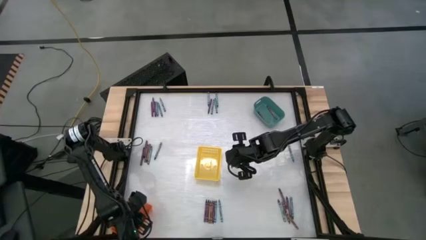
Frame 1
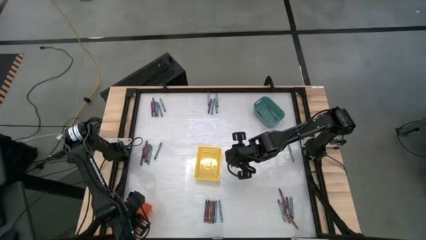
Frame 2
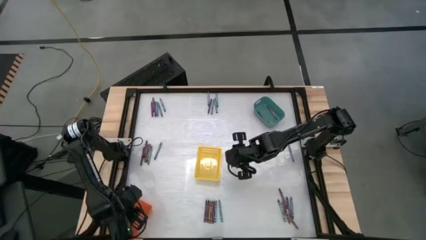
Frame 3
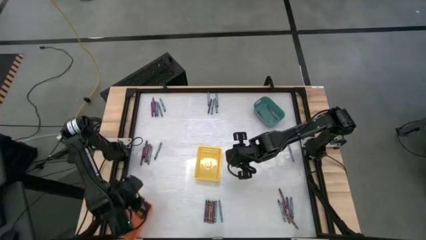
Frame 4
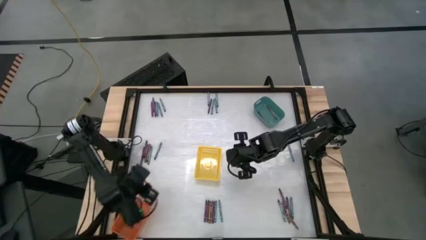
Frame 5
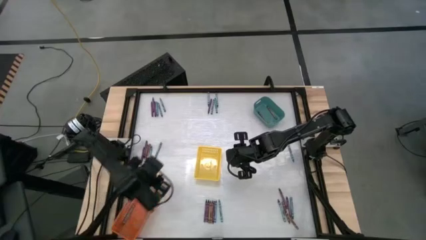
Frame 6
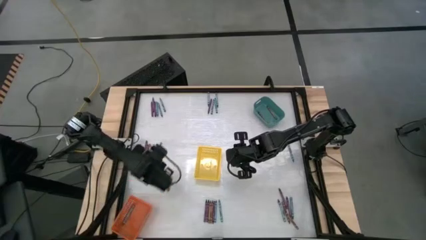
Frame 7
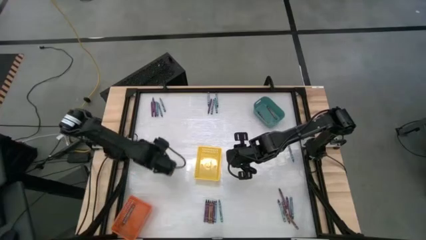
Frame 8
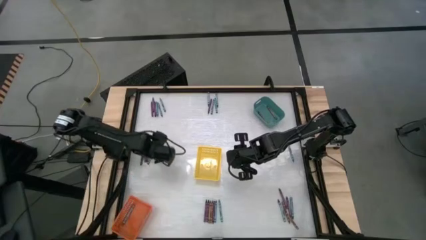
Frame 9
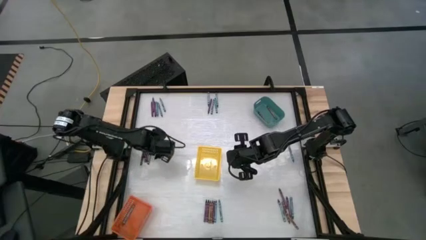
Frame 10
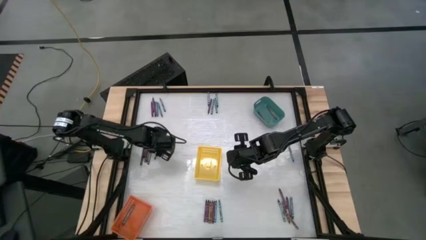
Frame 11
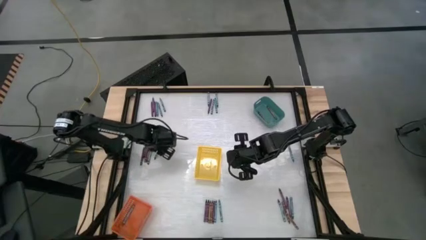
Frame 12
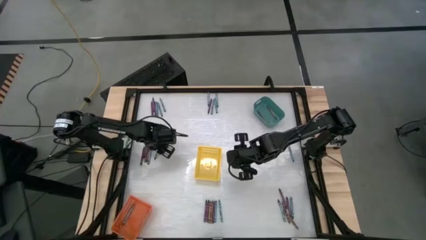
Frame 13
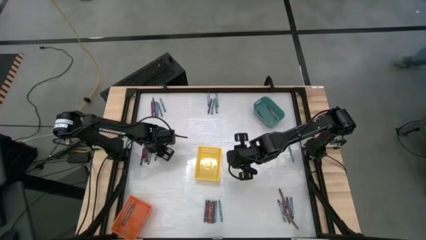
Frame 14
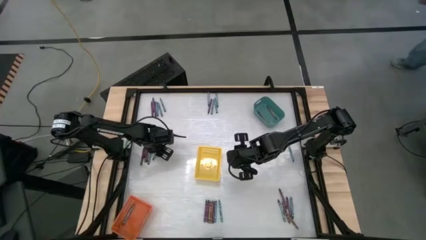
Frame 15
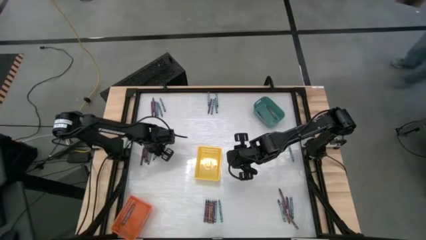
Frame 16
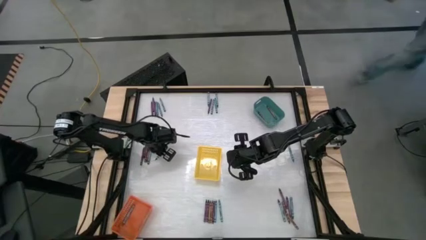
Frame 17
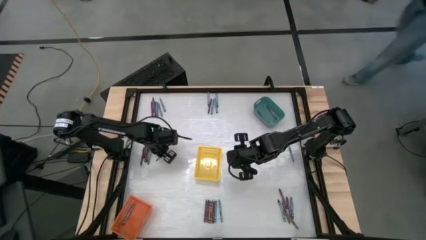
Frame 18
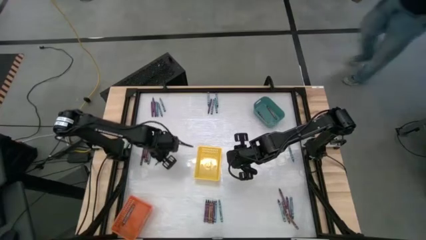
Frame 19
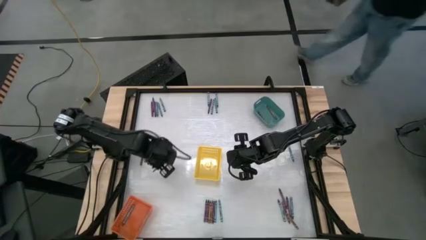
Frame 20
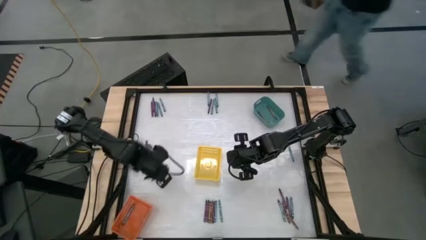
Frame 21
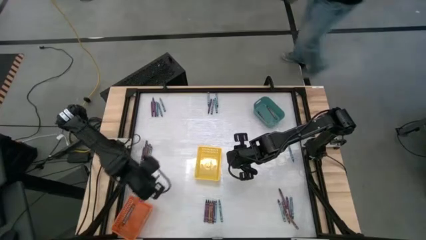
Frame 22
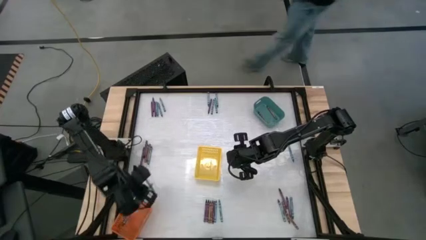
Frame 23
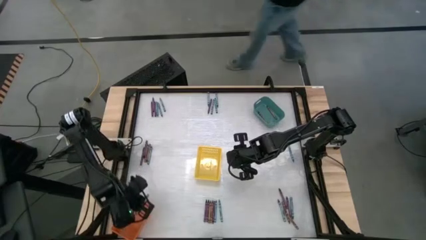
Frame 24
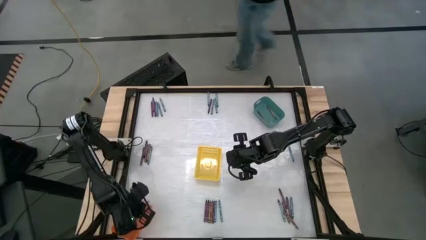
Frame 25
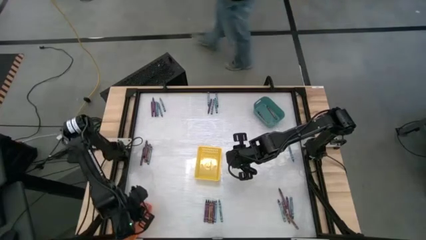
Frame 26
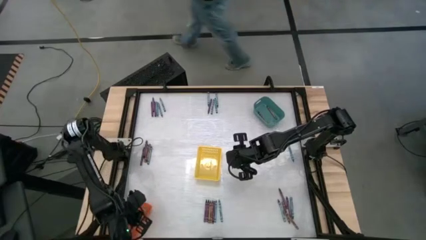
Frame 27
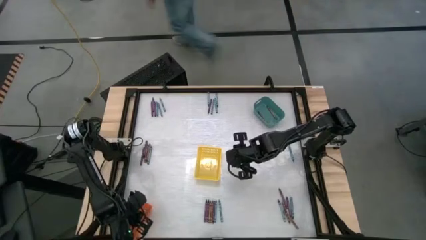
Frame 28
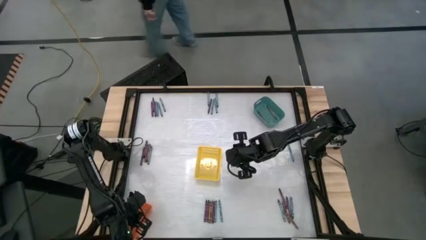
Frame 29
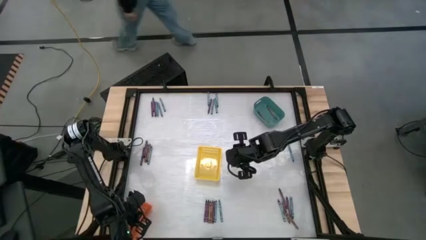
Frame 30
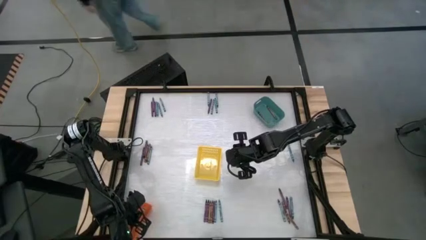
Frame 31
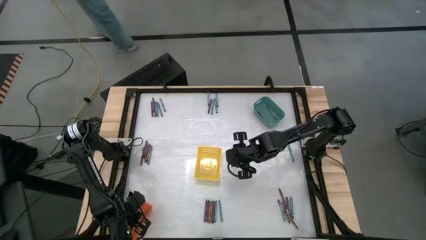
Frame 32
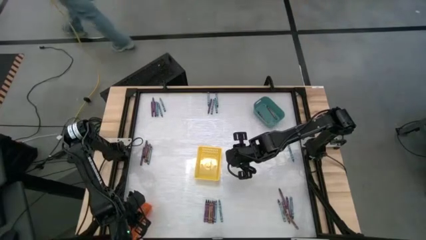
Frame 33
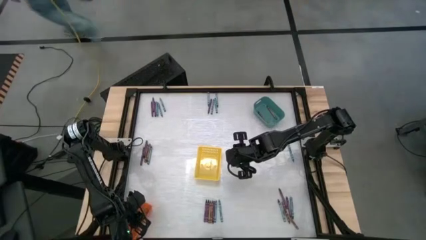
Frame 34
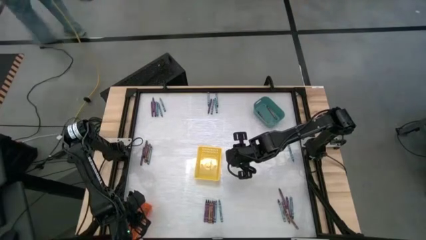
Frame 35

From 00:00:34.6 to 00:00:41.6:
Task: Sort crayons
Put the dark blue crayon into the orange basket

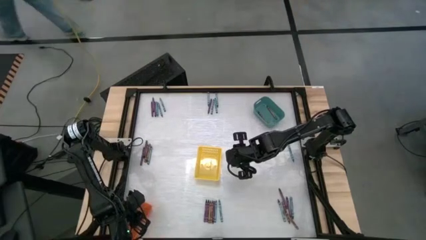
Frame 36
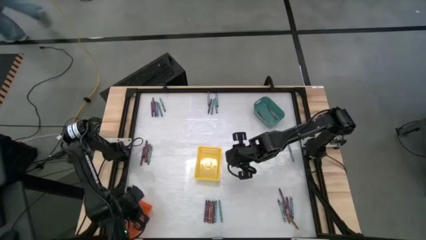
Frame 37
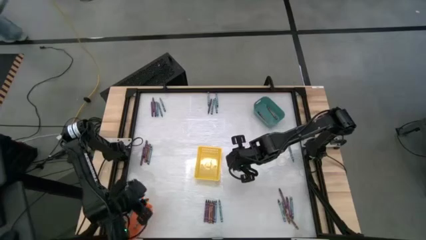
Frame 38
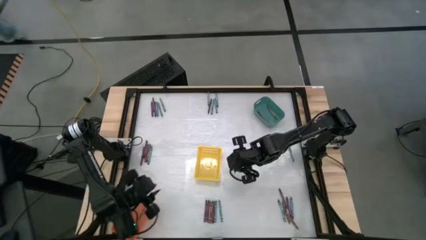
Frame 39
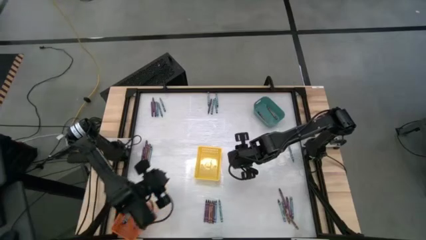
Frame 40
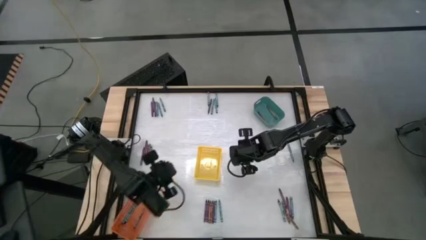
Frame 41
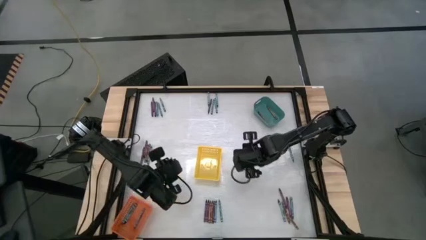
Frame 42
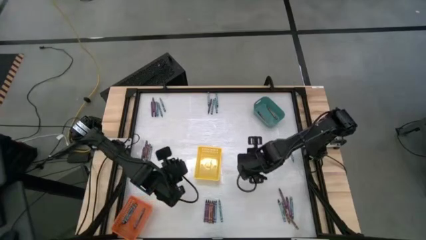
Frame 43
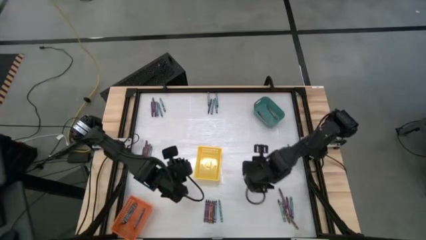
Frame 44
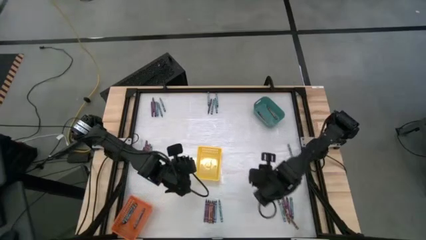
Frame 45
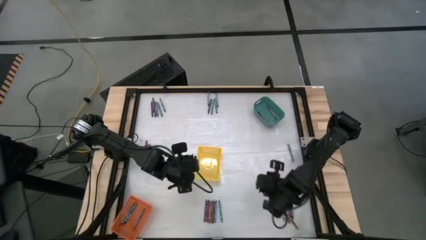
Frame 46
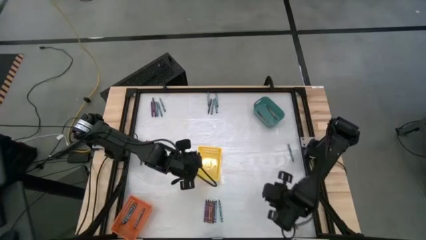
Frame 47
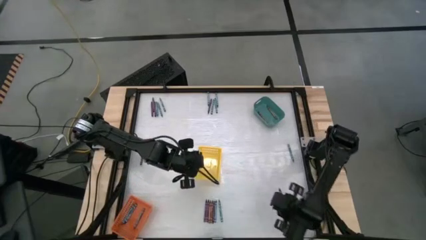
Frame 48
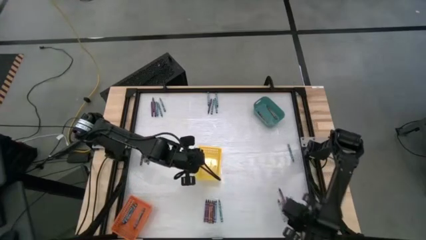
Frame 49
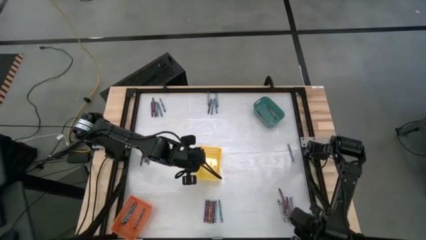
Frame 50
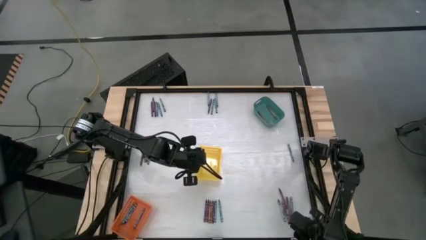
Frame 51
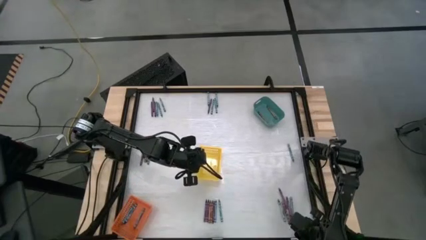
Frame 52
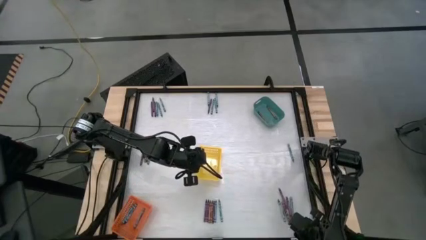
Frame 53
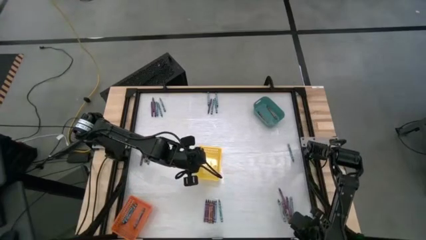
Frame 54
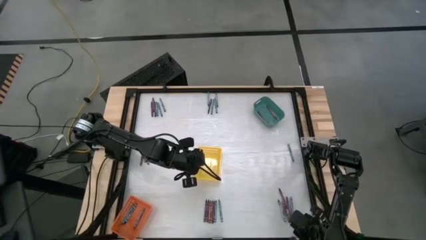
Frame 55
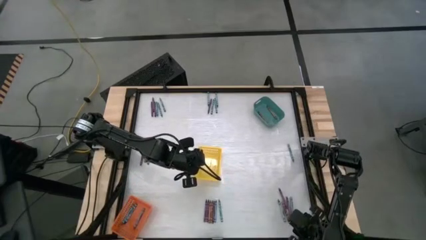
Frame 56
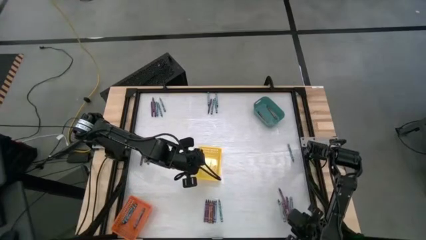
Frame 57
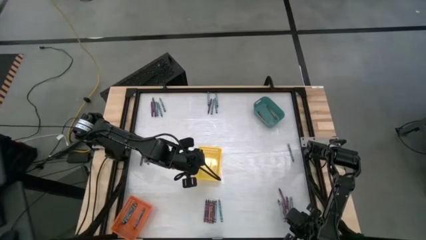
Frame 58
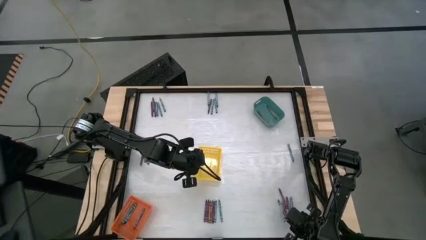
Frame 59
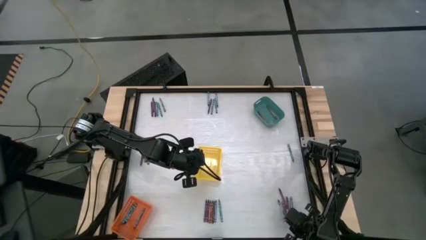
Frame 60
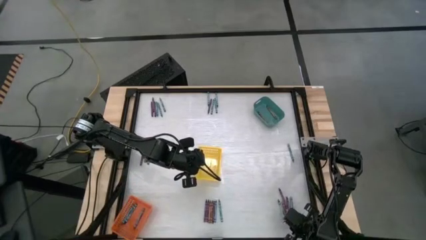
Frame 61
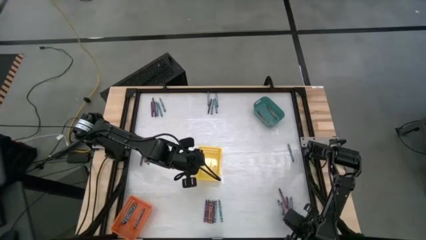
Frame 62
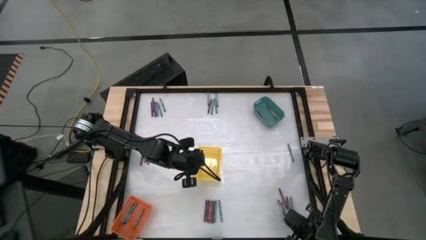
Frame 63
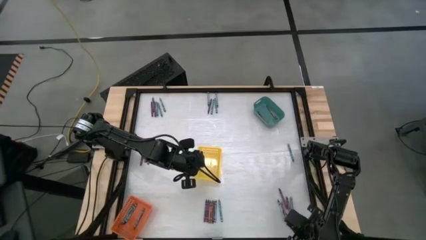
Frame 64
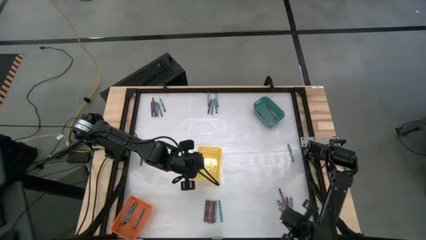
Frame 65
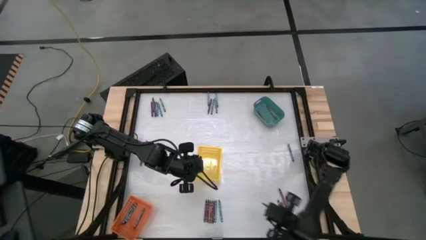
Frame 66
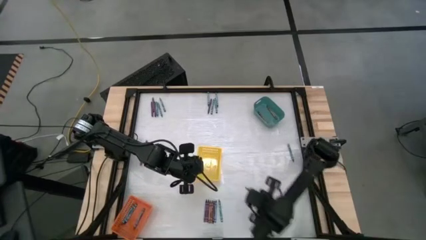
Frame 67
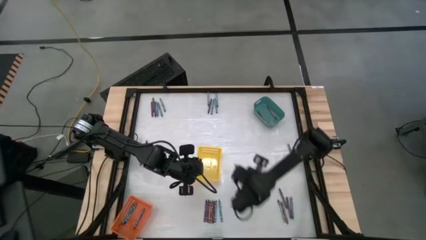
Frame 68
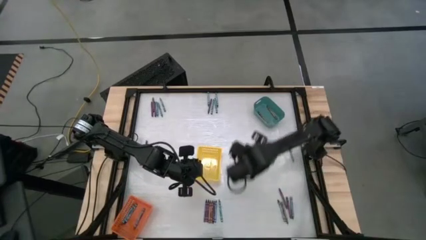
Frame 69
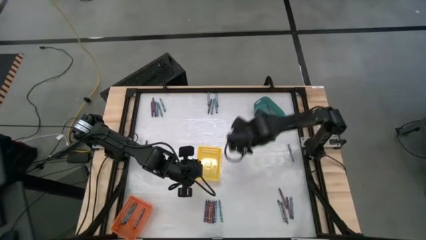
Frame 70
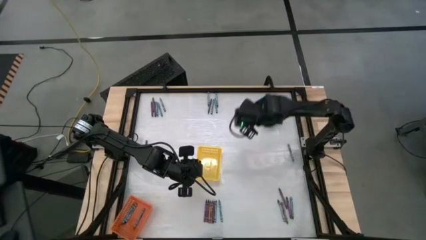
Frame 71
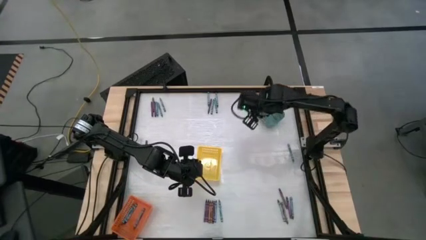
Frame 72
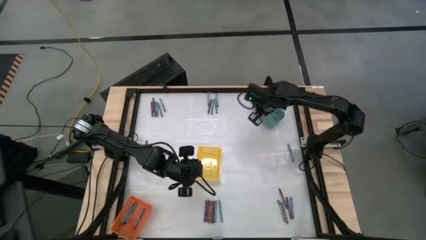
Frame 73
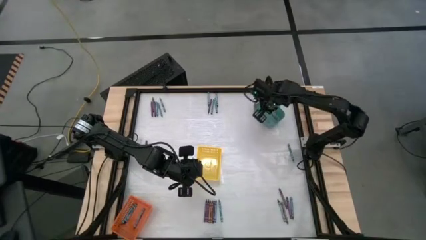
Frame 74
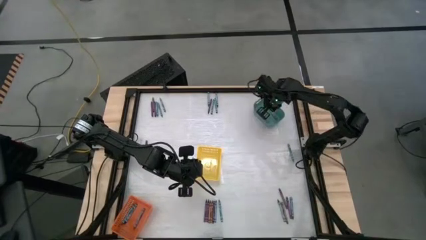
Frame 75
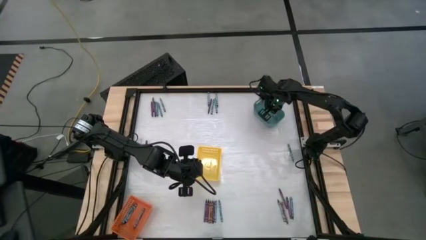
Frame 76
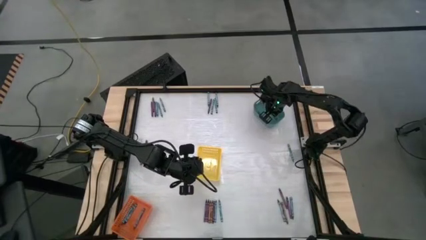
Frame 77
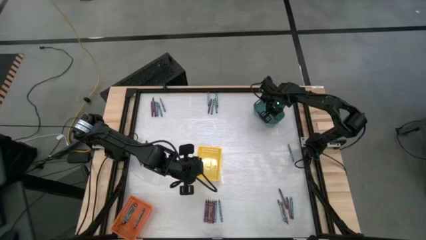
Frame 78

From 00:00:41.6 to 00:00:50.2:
Put the brown crayon into the green bin
